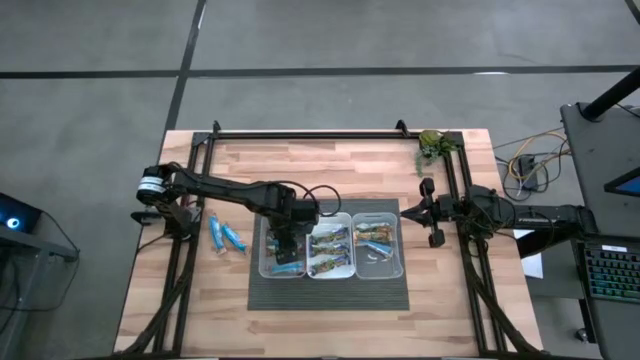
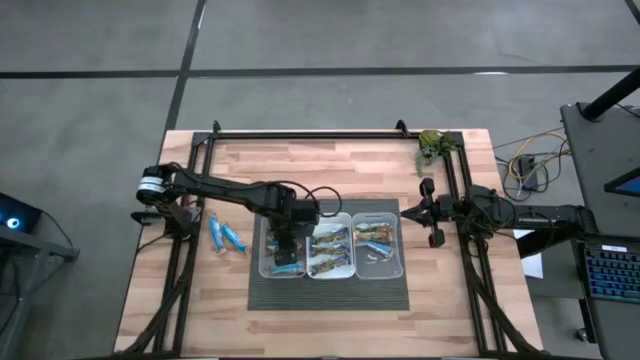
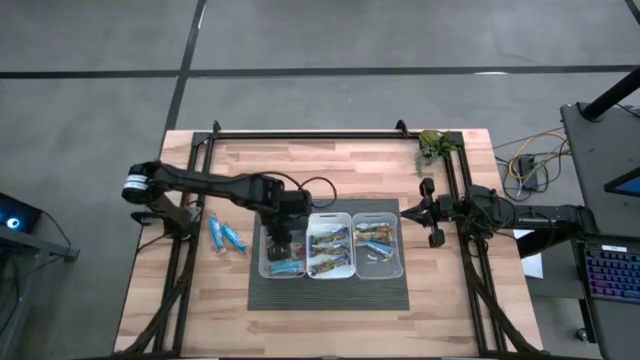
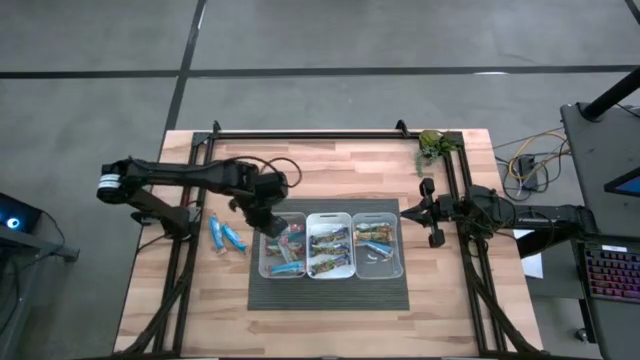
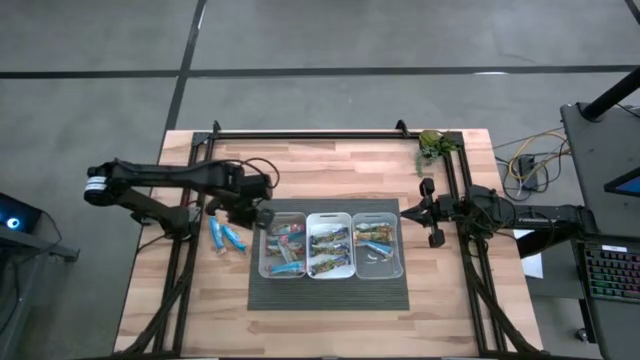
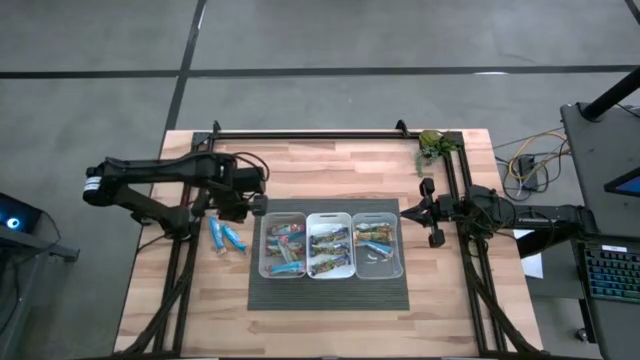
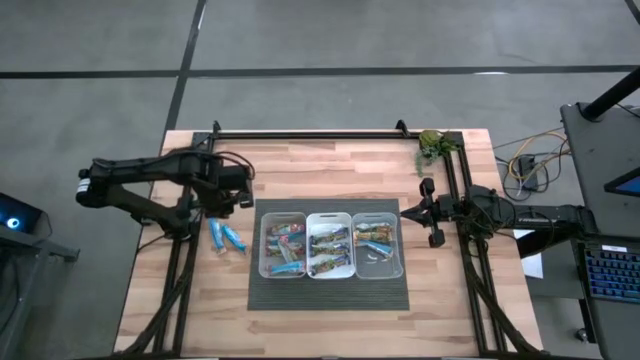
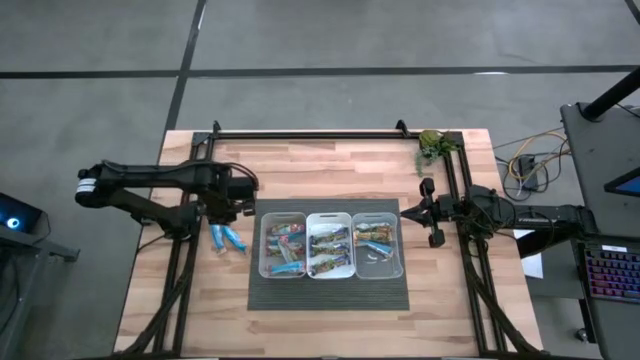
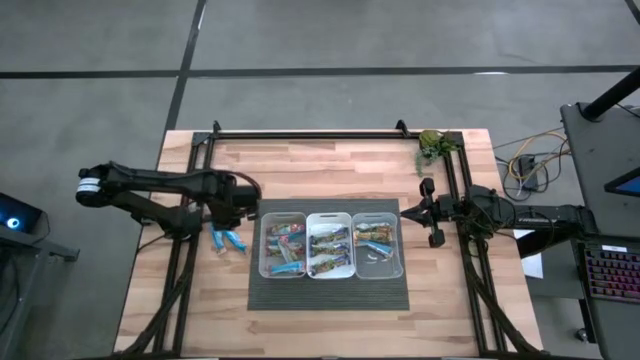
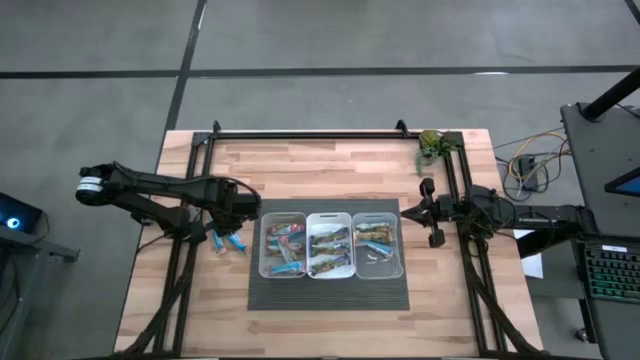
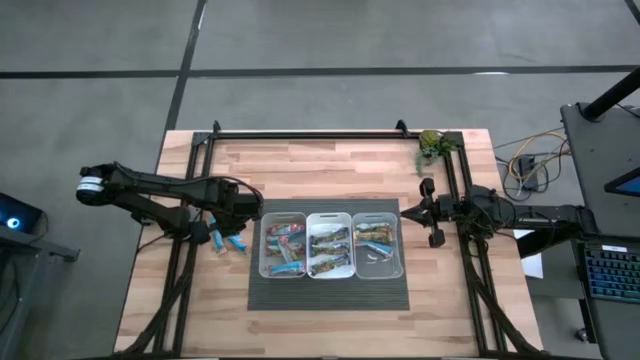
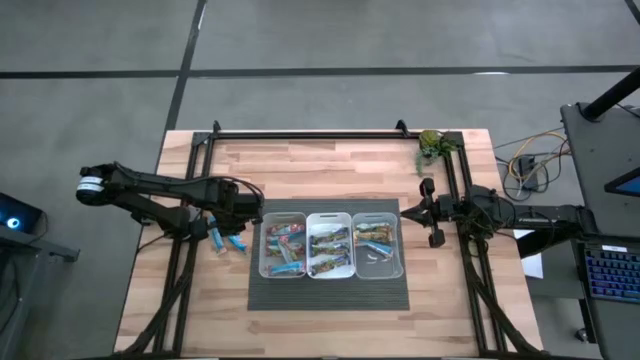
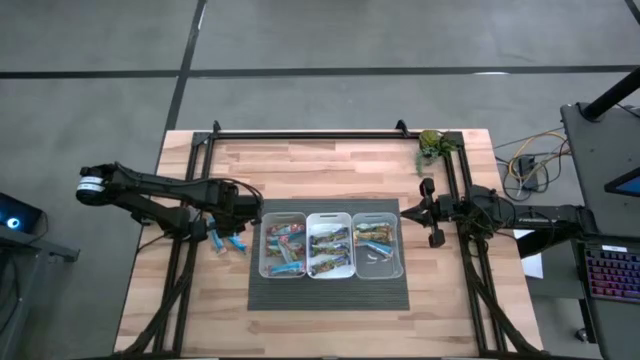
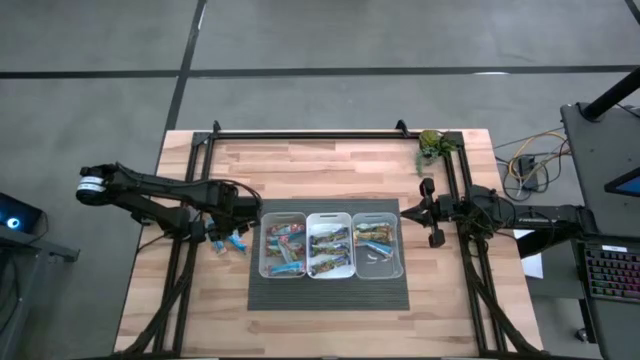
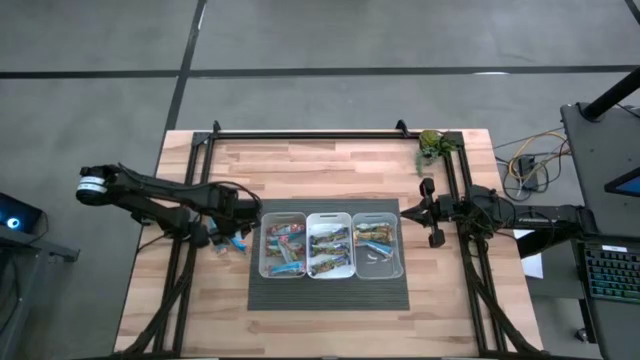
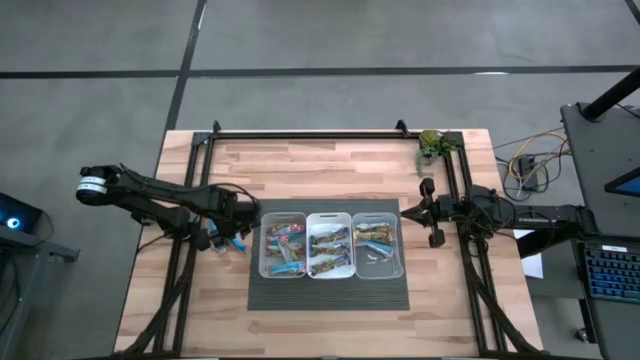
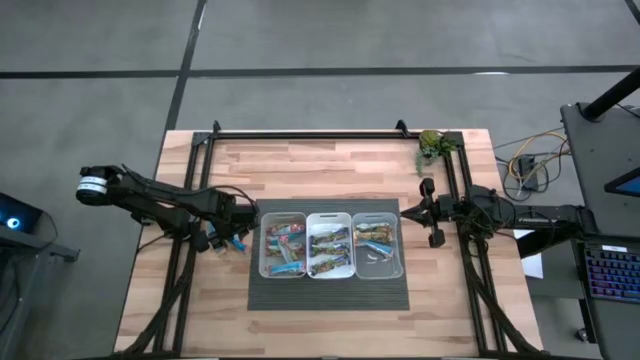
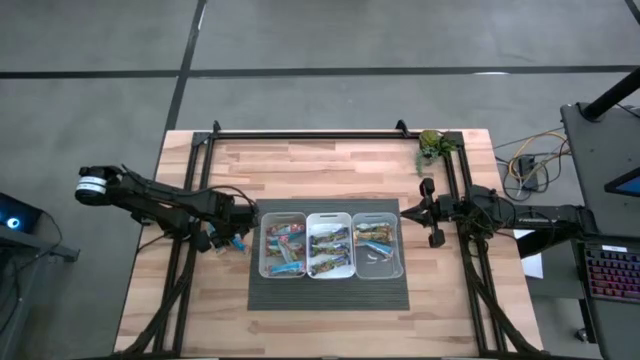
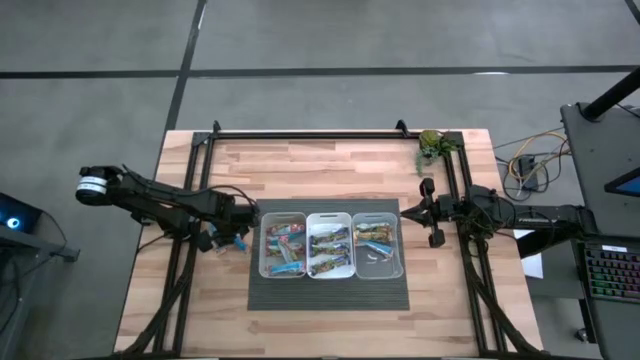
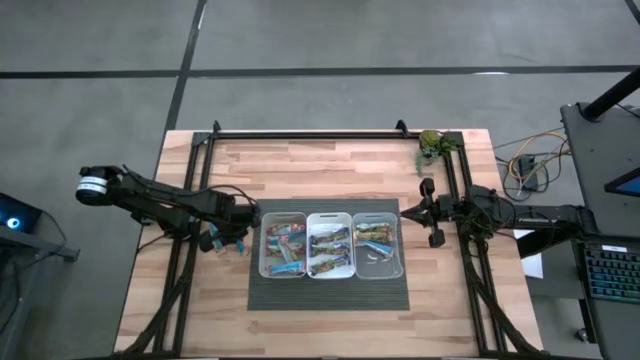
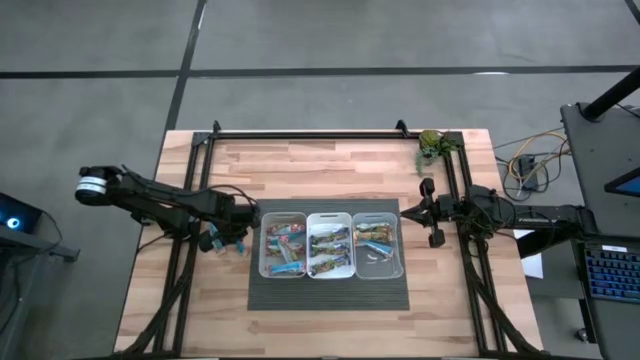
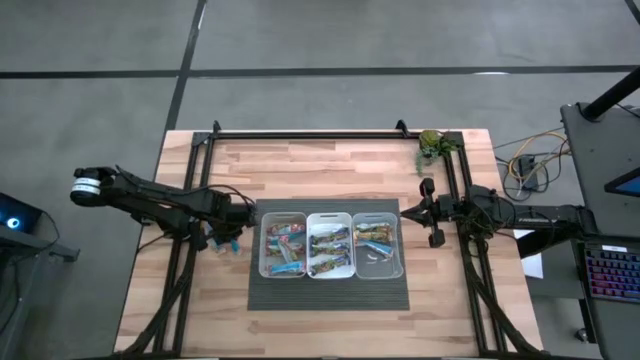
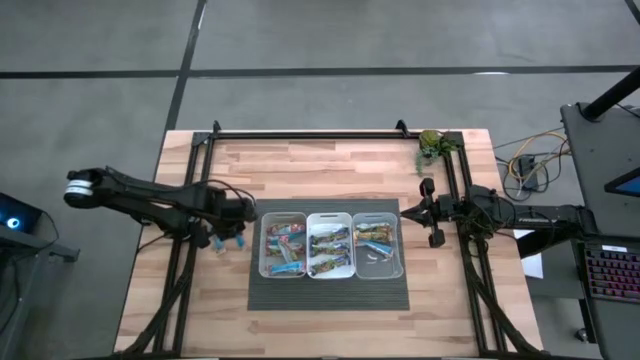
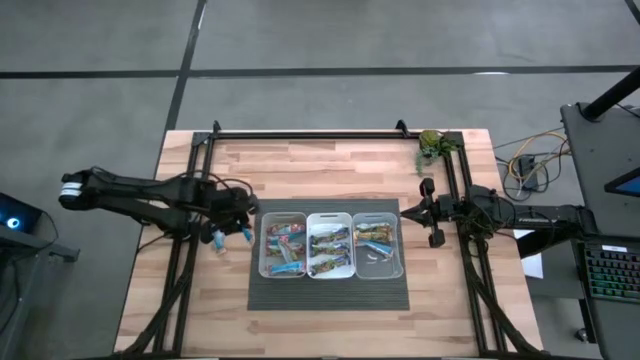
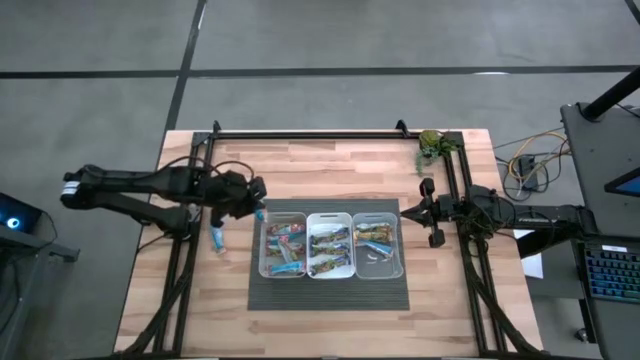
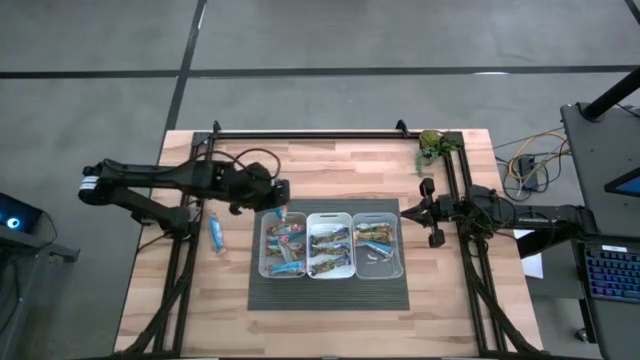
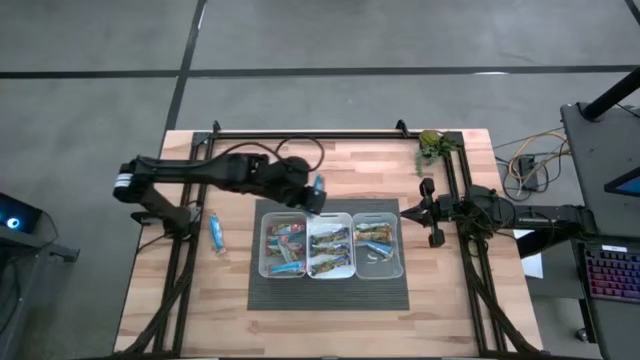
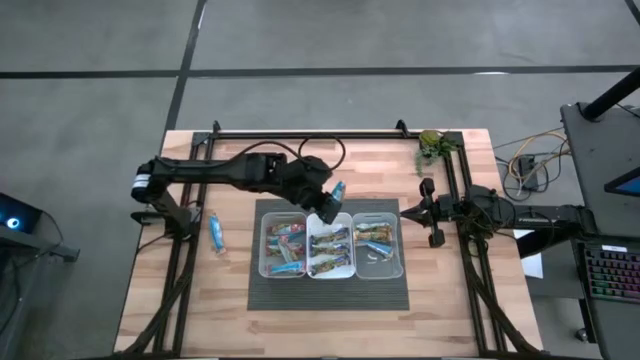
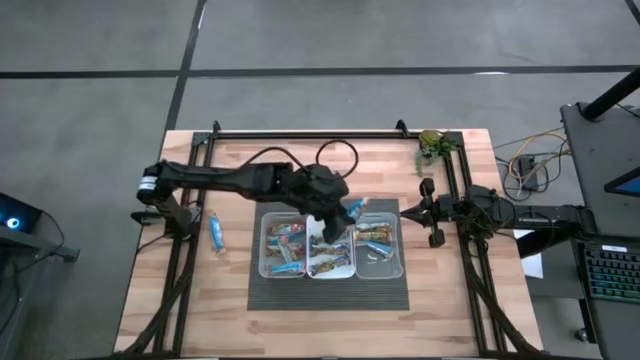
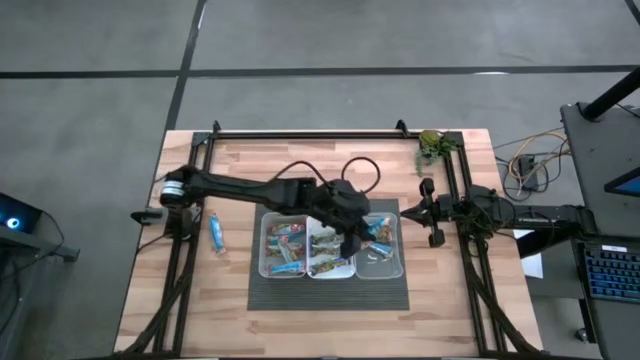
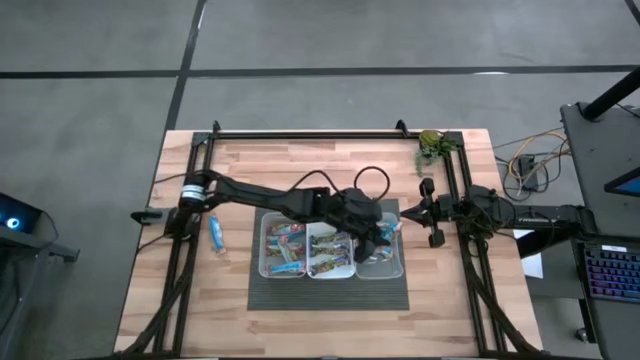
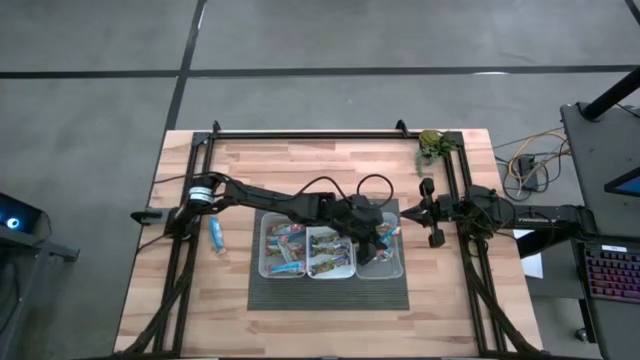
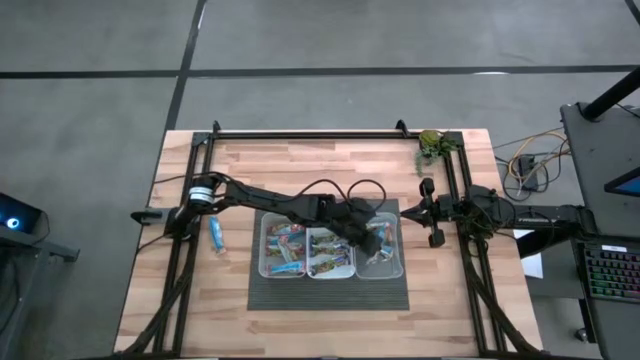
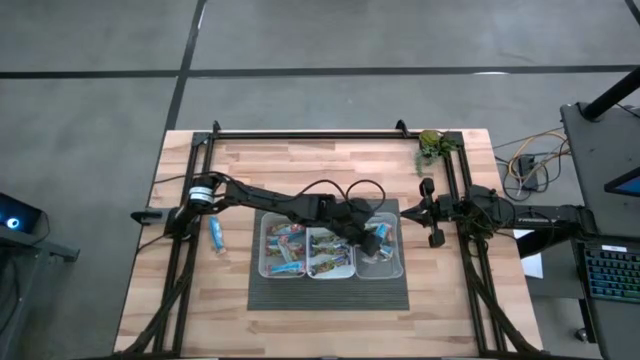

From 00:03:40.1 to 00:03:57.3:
Task: Pick and place Granola Bars by type
Put the right yellow granola bar into the transparent bin

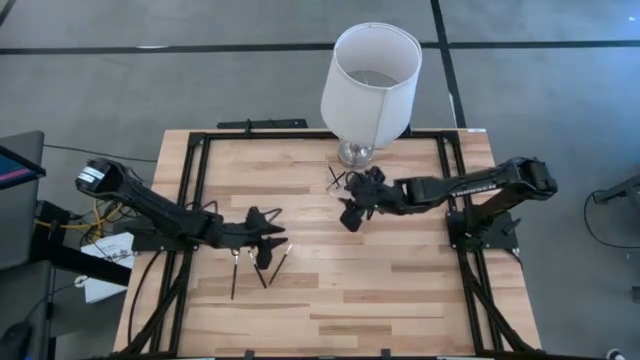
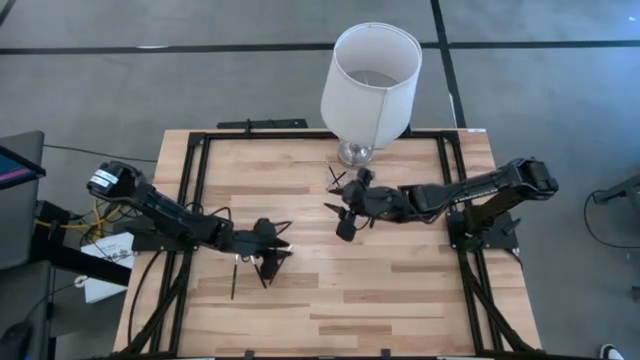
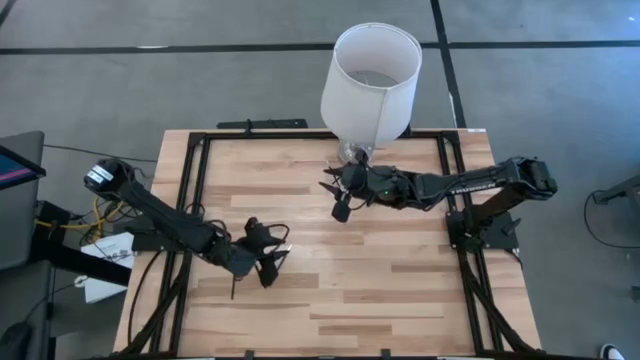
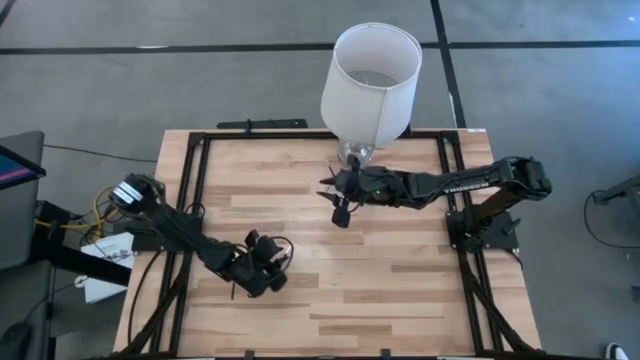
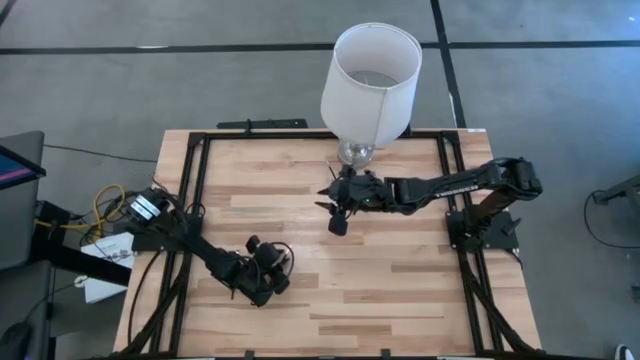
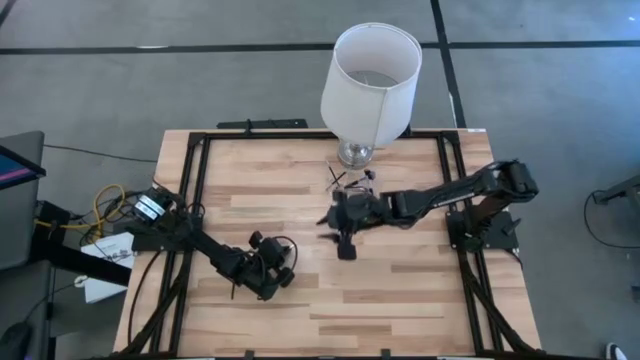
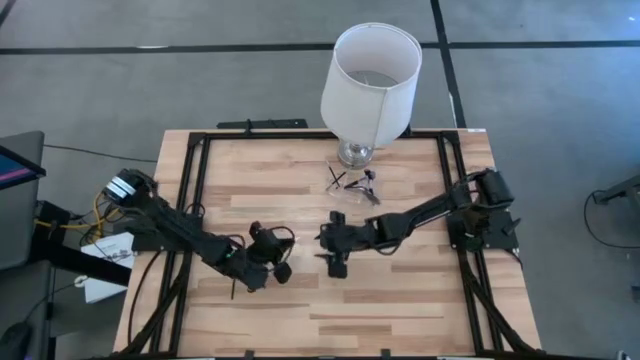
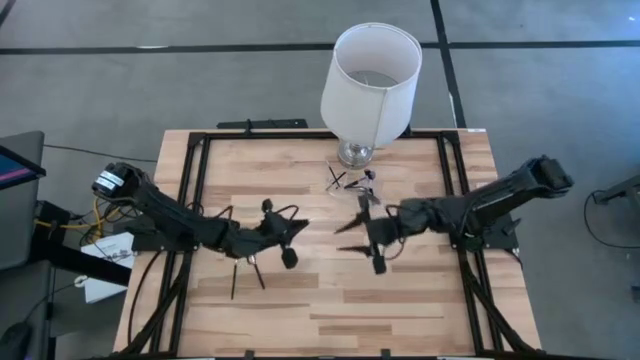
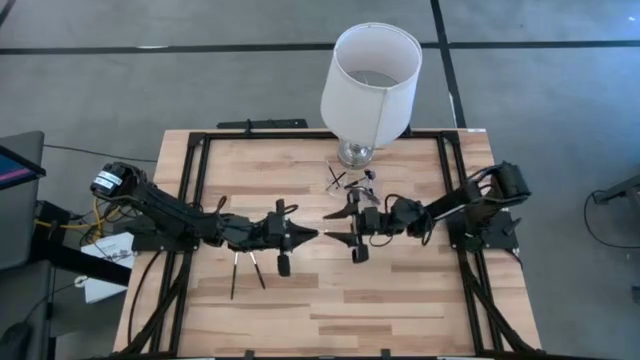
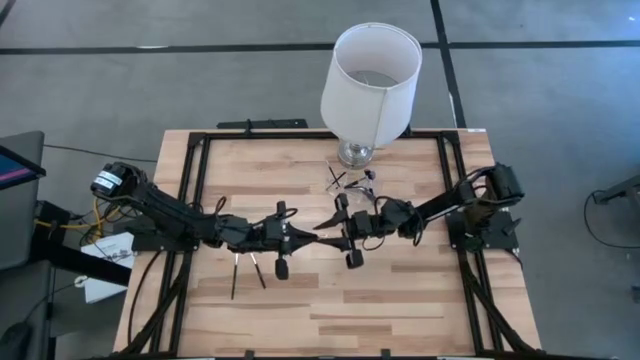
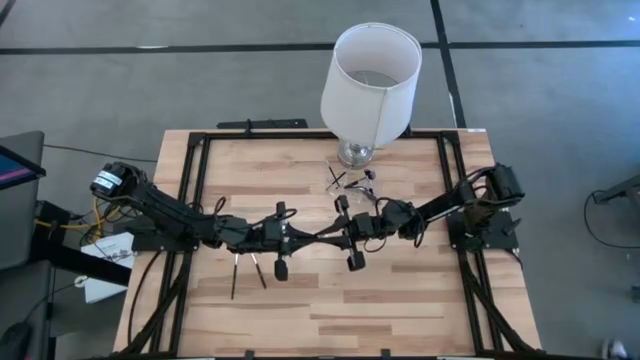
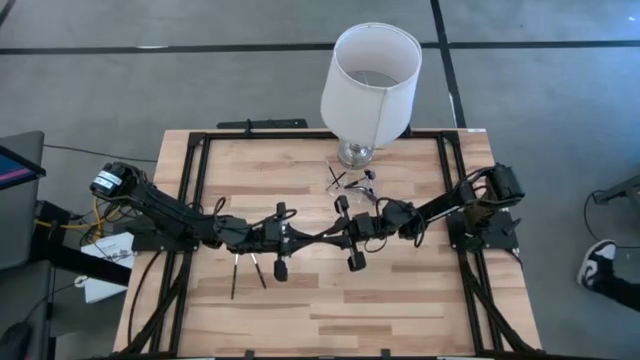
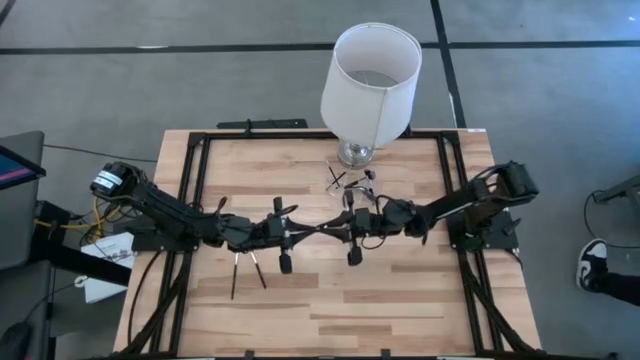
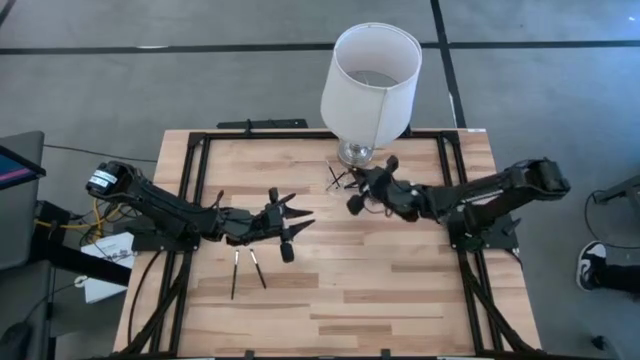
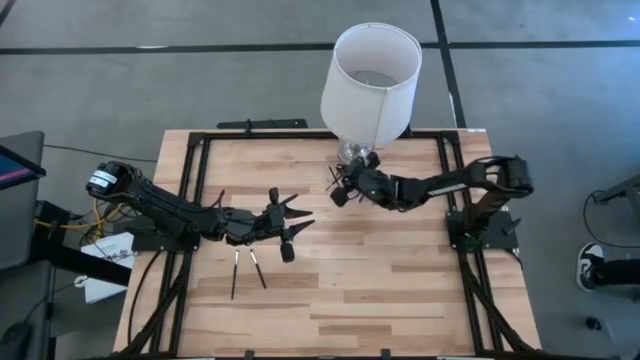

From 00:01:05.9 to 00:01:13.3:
Task: Put items in baskets/containers
Put the white eyeshadow brush into the transparent organizer
